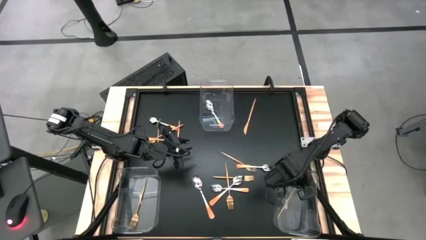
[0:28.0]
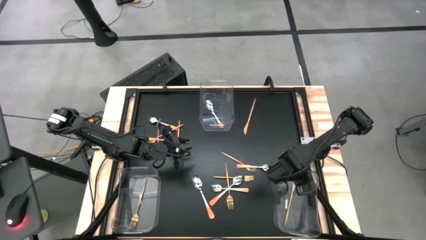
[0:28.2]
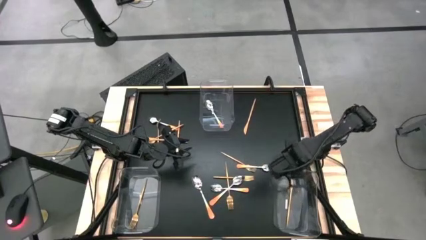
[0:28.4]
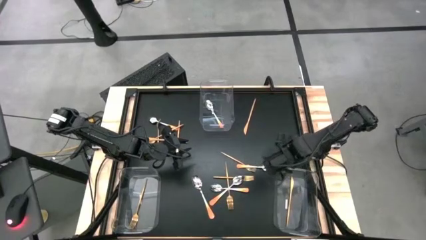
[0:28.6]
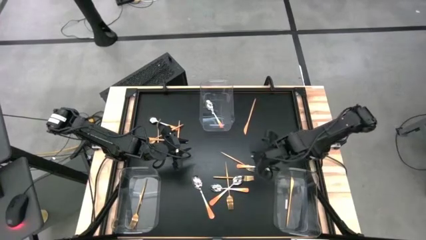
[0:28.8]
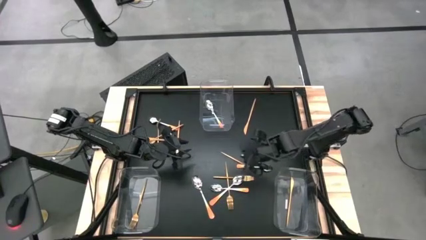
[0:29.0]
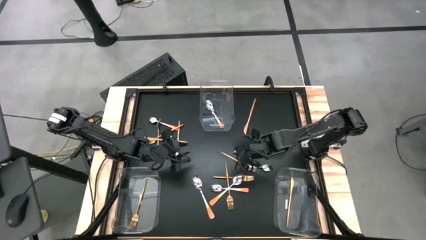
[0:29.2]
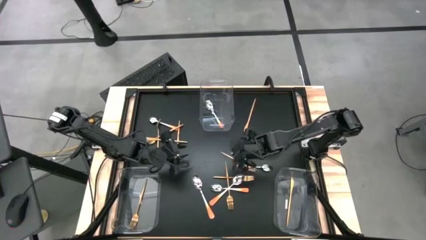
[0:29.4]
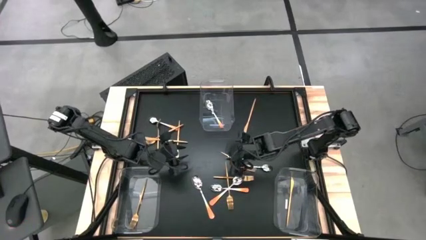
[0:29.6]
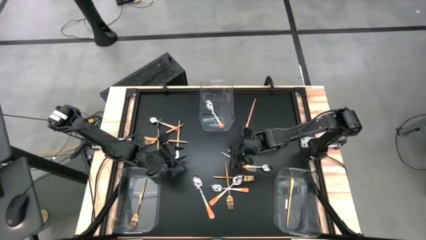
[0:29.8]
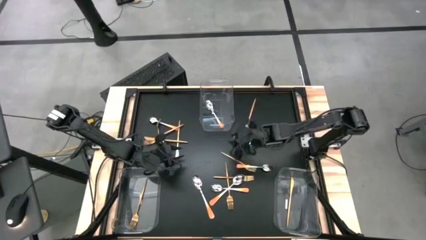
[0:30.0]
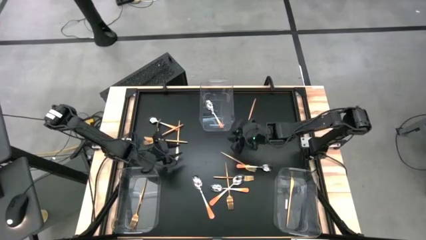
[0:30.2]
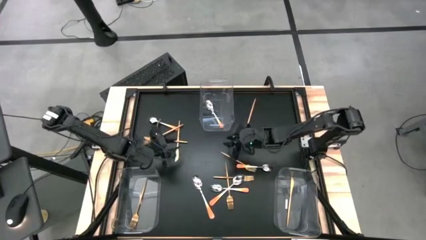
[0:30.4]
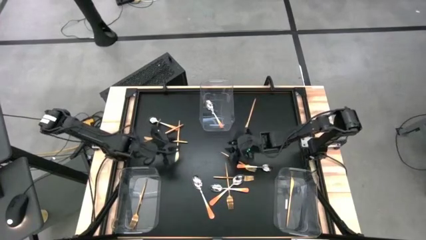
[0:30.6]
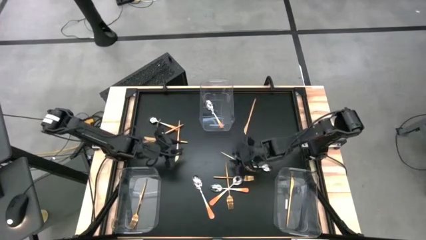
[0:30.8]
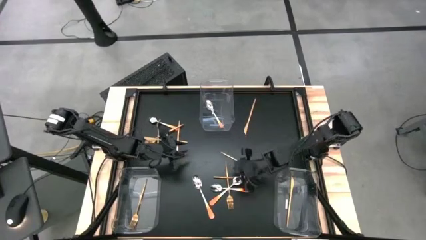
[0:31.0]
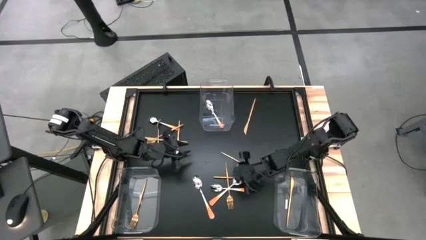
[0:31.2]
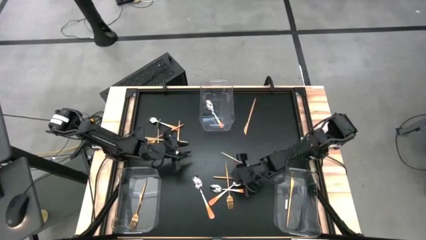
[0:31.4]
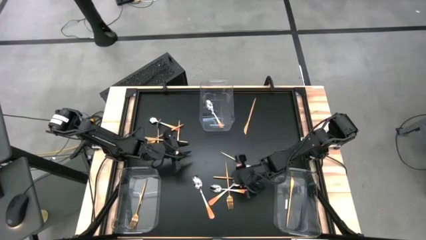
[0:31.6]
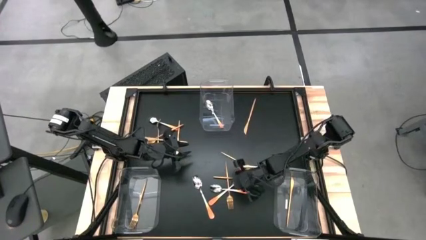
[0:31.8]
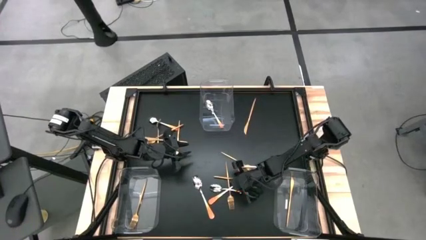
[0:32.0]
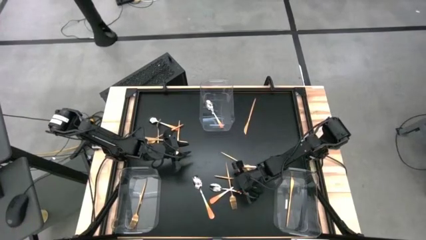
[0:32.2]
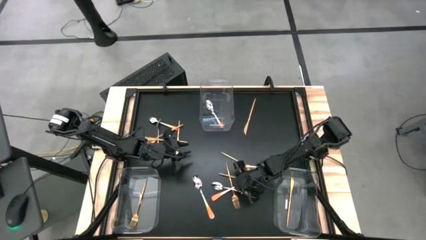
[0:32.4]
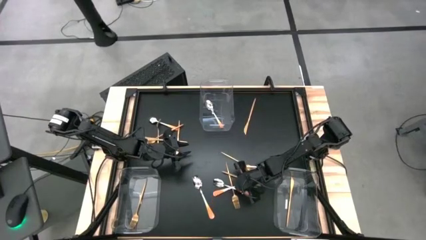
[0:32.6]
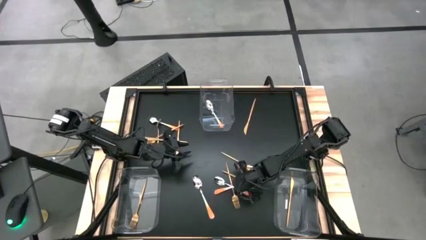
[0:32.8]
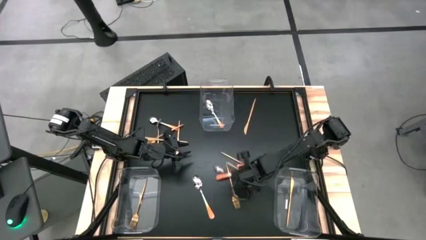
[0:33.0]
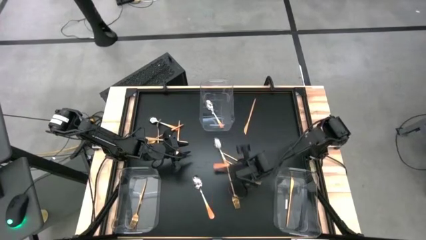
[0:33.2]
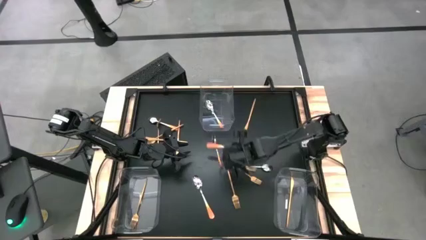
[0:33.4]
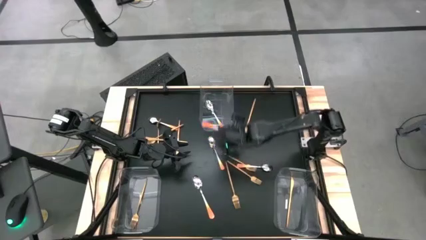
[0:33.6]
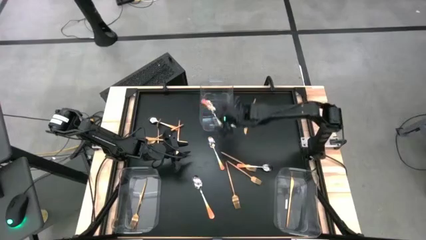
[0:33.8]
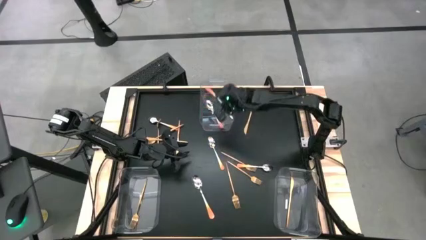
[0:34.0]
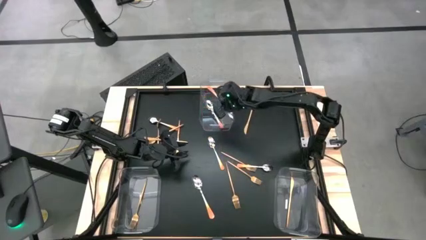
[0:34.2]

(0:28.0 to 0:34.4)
Task: Sort silverware by color (type)
Put the orange spoon into the top transparent bin

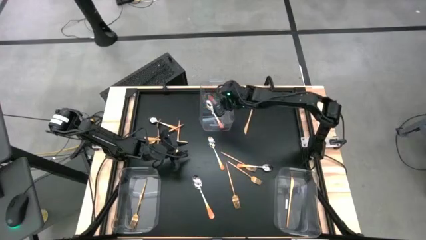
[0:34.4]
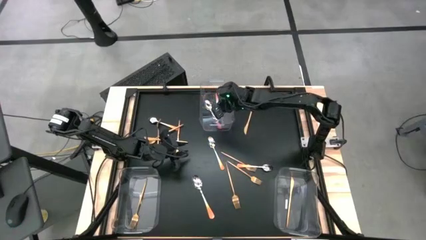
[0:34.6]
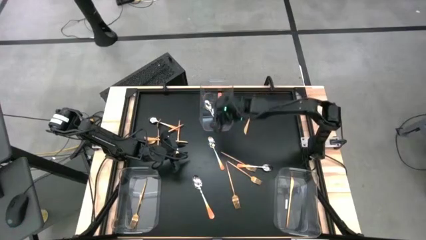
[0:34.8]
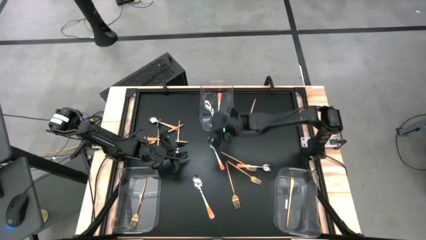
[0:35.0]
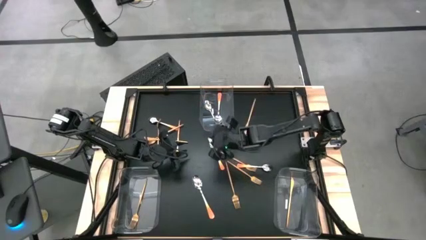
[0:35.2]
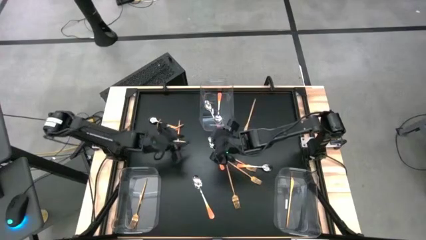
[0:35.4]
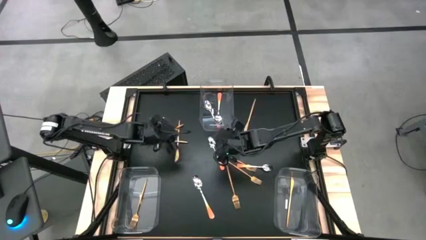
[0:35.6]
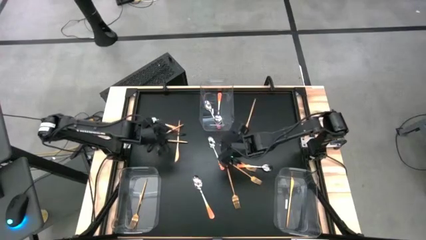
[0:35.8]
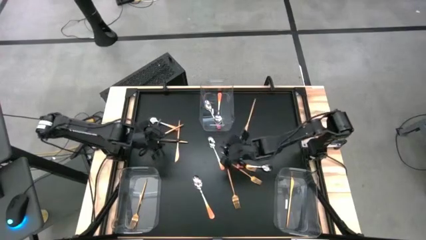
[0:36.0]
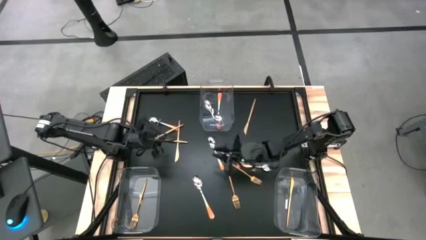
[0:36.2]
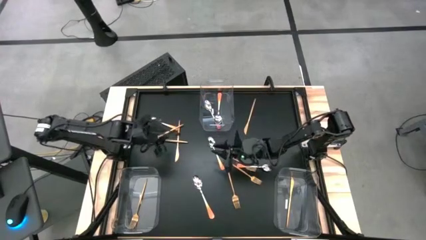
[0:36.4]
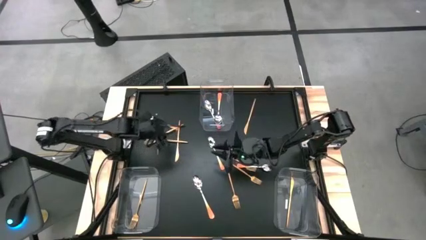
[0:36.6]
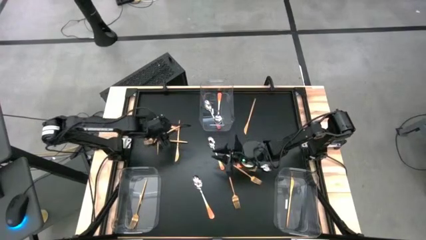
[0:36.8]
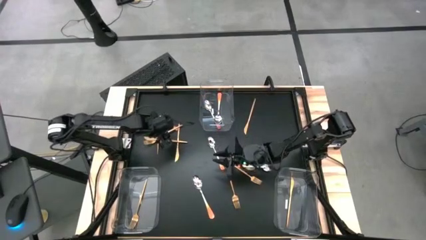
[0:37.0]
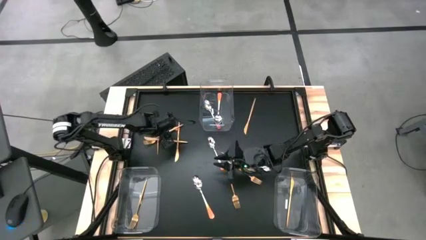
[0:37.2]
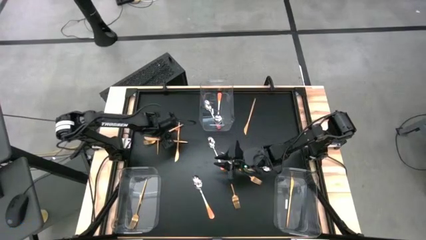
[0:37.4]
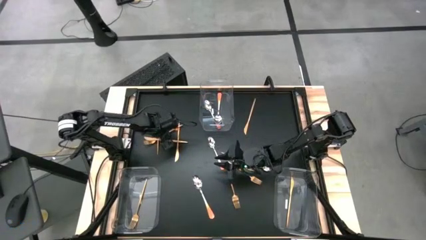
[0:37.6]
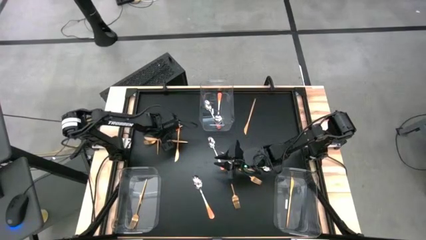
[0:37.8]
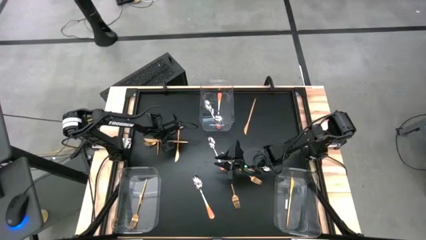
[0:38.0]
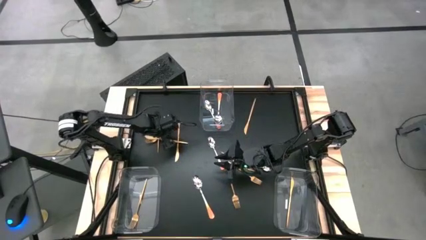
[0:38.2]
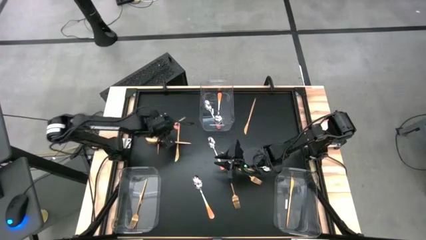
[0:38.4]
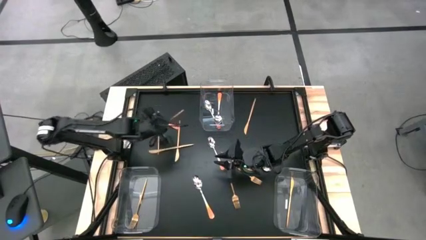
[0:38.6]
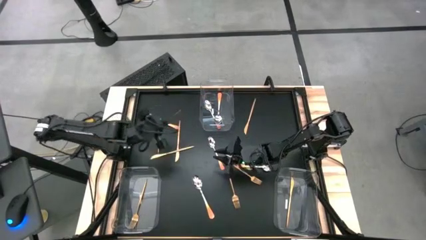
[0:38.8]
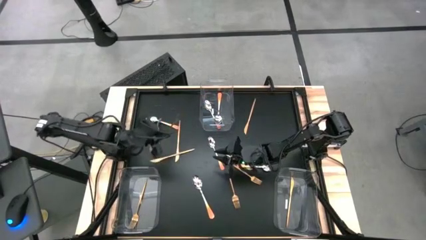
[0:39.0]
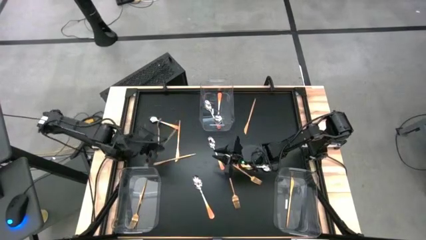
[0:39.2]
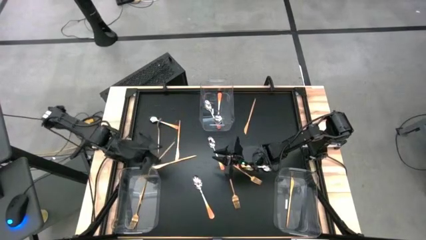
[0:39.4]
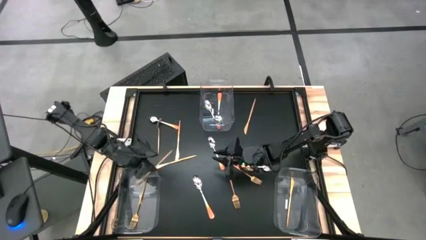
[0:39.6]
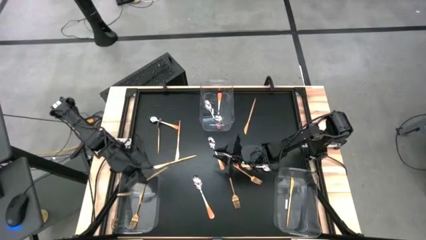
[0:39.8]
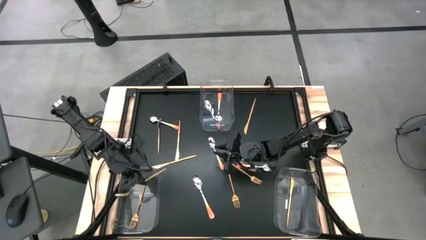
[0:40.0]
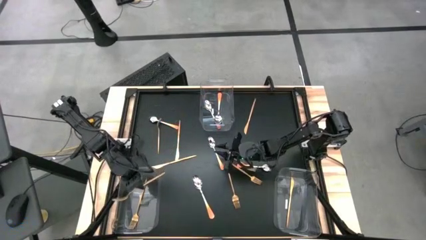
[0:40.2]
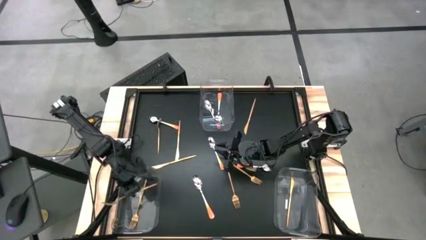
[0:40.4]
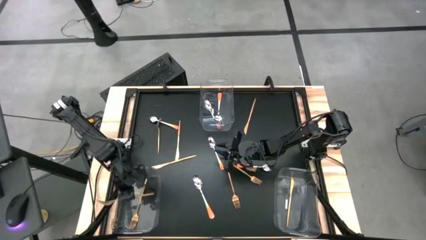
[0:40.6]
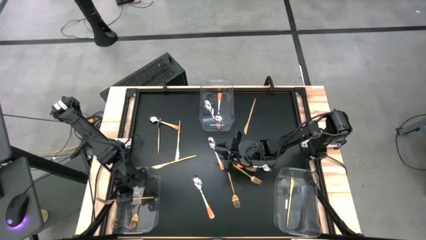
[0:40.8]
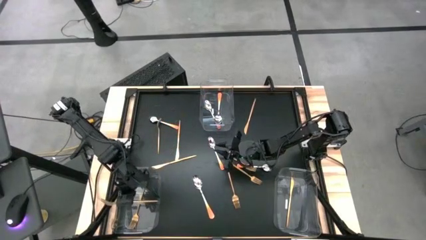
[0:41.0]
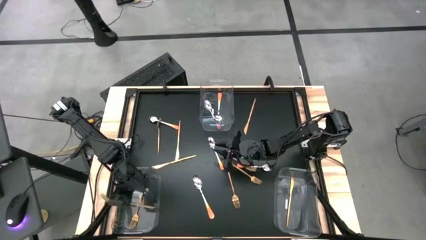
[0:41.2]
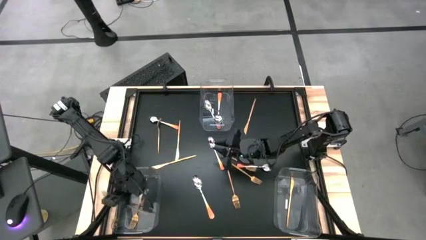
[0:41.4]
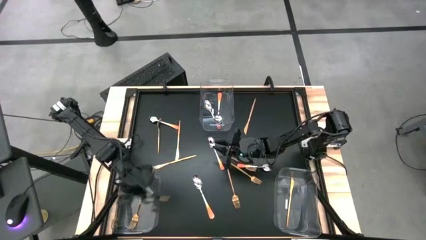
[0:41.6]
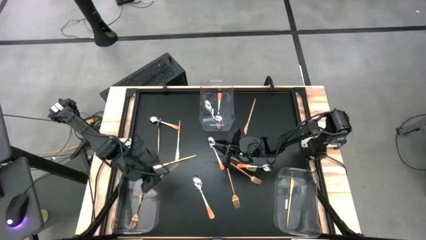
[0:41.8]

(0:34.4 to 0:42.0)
Put the gold fork into the bottom left transparent bin

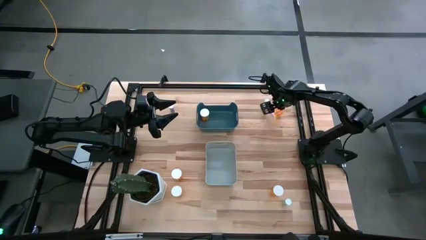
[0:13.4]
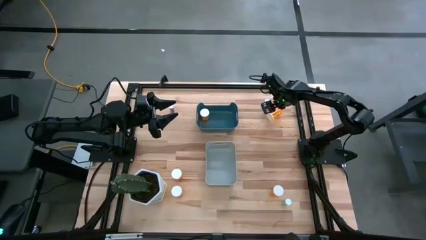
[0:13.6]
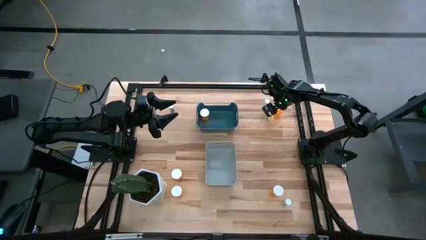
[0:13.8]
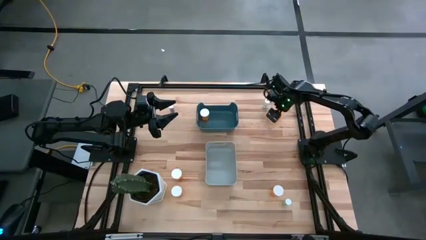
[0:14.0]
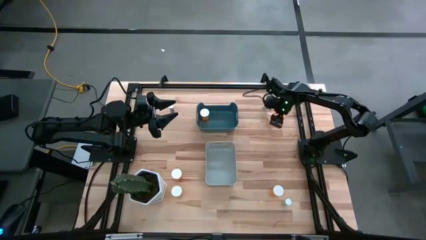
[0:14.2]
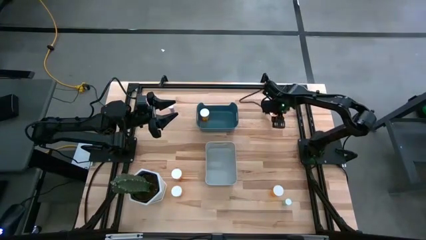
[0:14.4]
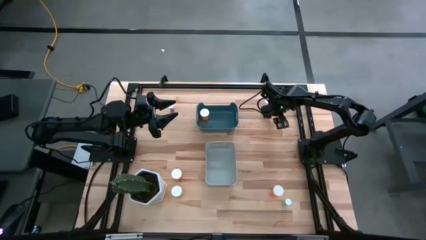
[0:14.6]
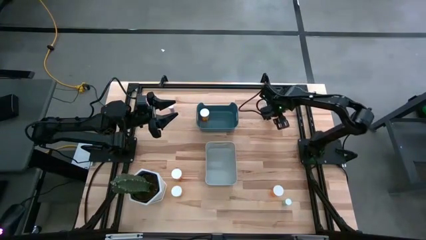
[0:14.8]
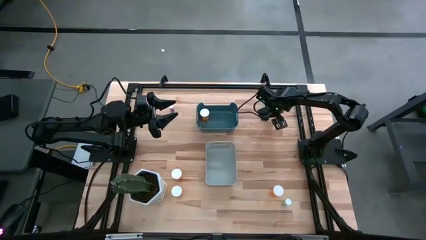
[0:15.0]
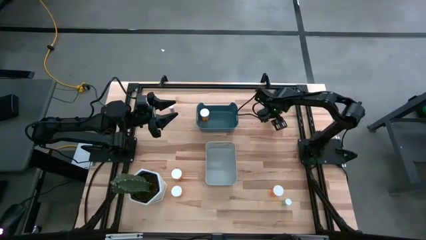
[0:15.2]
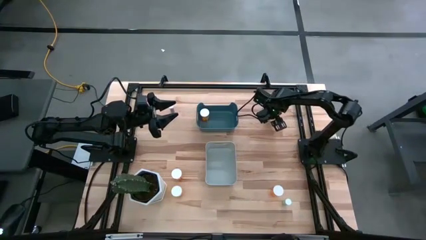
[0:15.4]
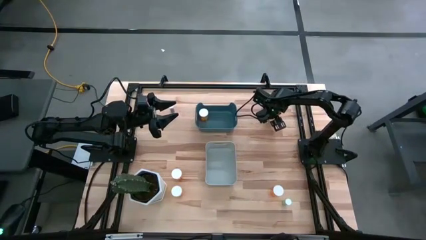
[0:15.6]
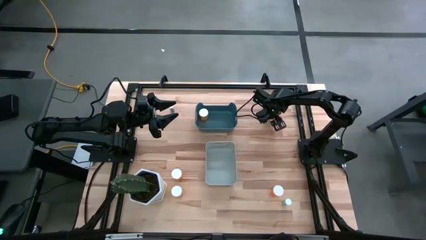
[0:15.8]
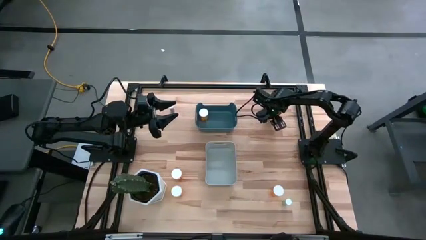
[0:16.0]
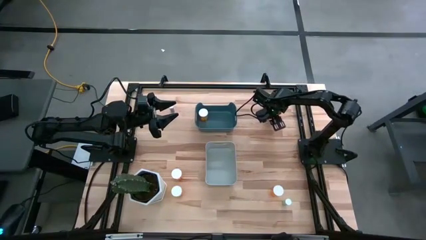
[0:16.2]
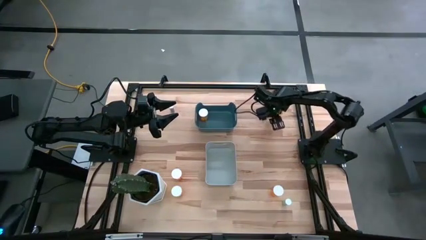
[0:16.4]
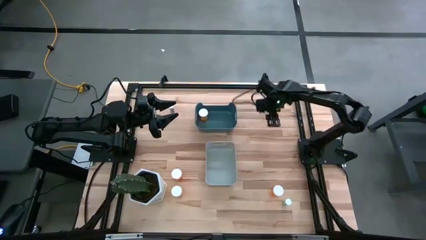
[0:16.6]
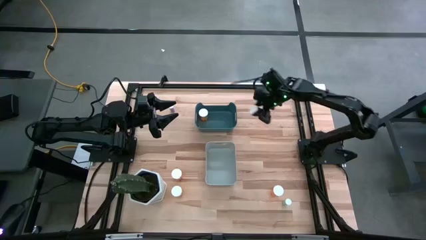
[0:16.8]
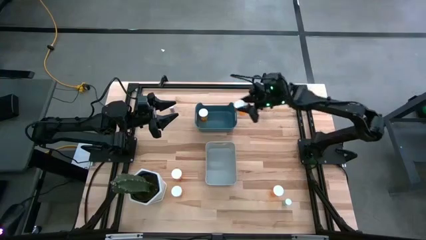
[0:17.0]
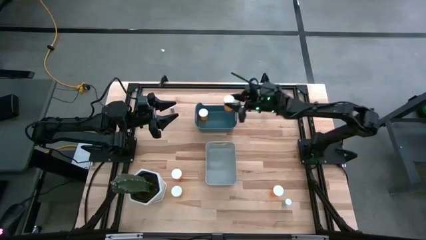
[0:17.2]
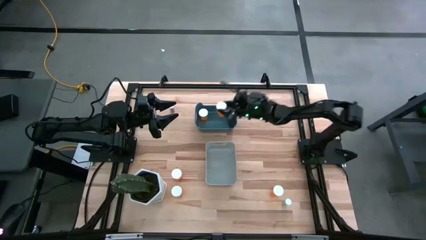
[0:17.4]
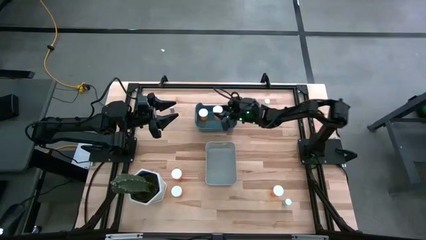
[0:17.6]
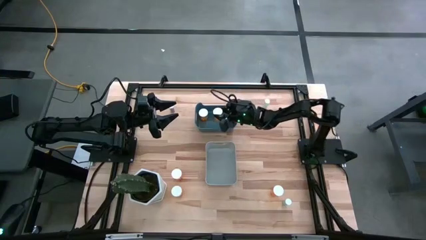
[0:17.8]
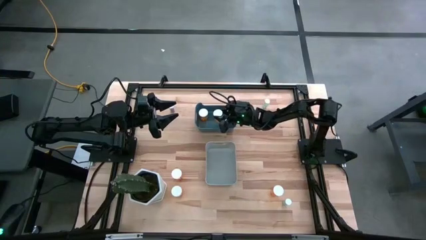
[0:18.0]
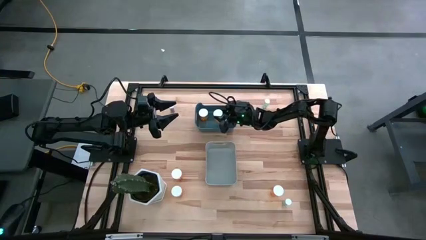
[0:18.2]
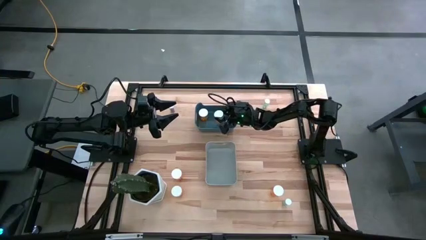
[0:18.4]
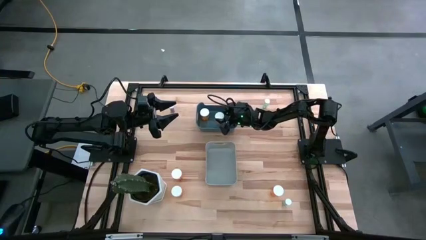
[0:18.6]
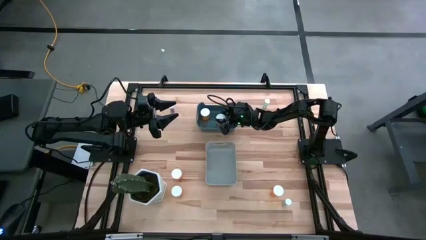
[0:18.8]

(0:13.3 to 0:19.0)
Task: Pick and place medicine bottles into bin by pill shape (circle, oval)
Put the orange capsule bottle into the blue bin
